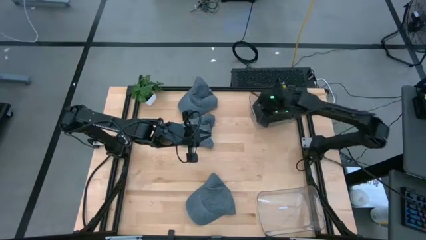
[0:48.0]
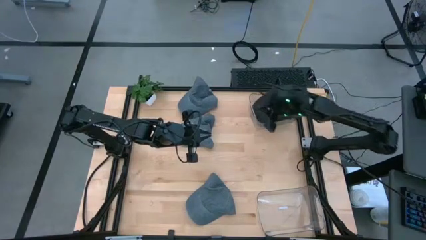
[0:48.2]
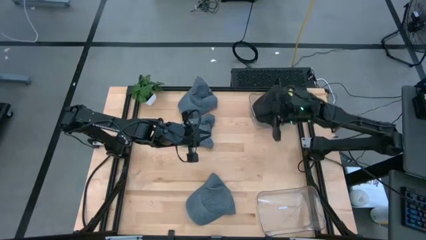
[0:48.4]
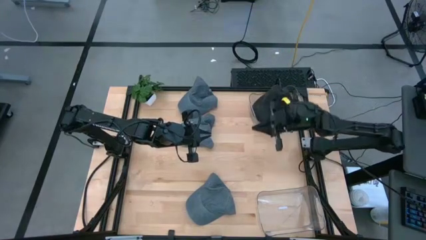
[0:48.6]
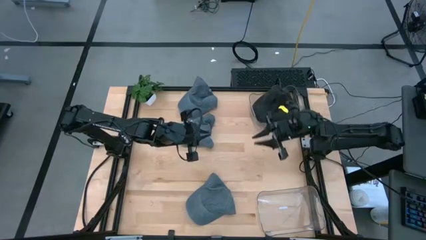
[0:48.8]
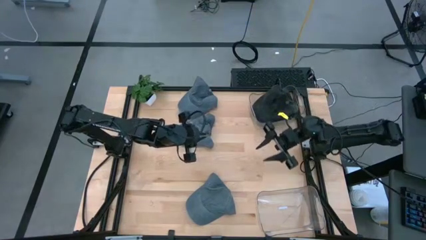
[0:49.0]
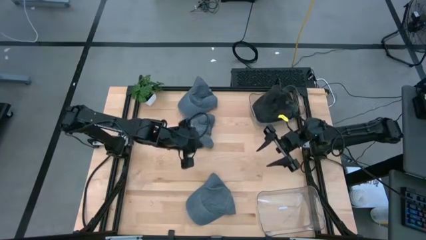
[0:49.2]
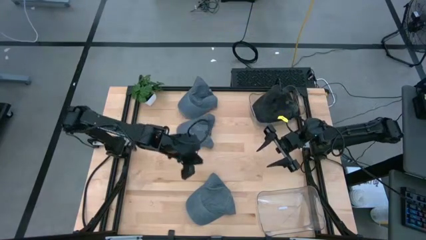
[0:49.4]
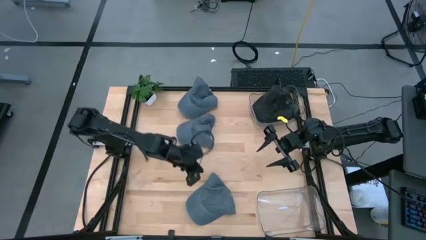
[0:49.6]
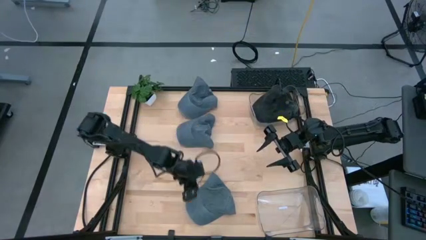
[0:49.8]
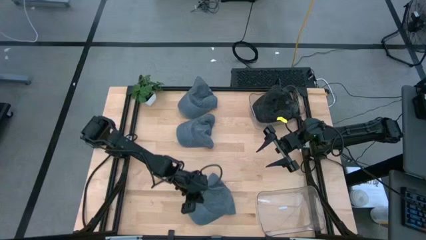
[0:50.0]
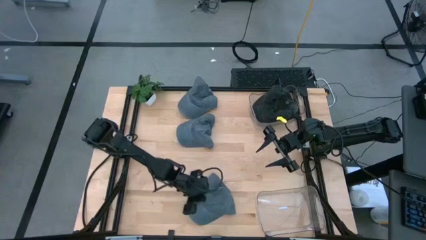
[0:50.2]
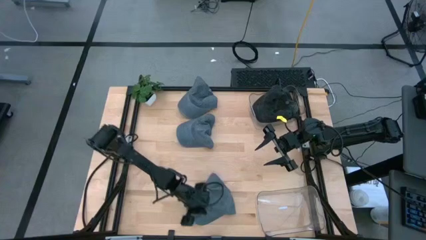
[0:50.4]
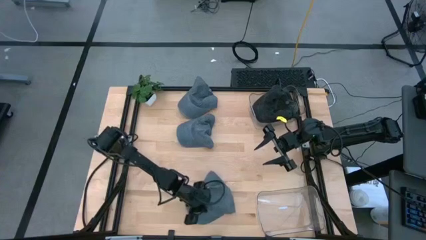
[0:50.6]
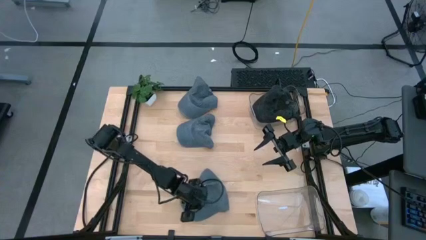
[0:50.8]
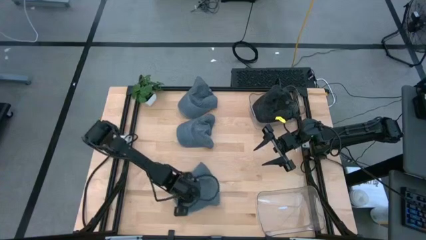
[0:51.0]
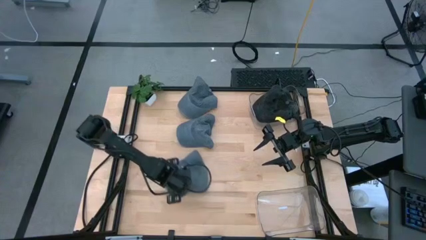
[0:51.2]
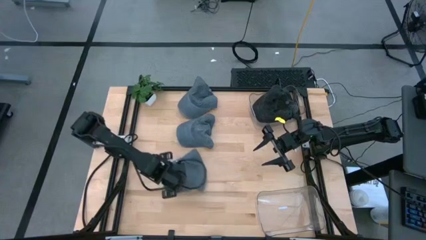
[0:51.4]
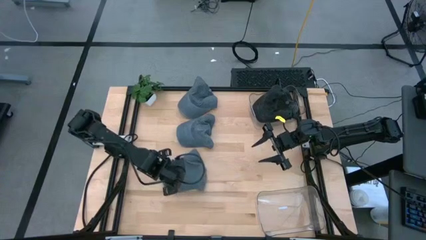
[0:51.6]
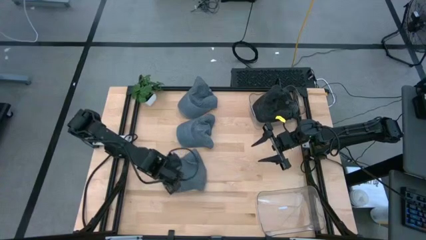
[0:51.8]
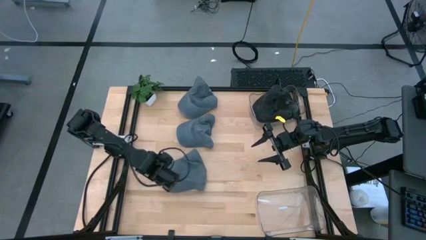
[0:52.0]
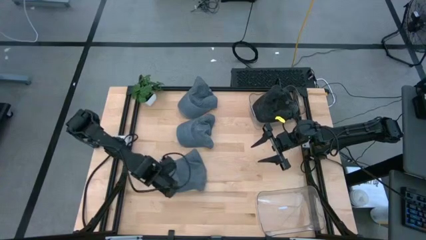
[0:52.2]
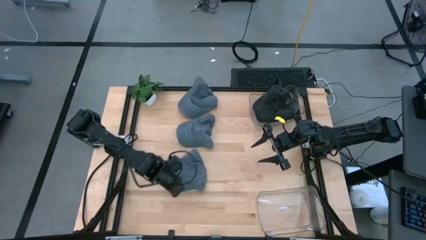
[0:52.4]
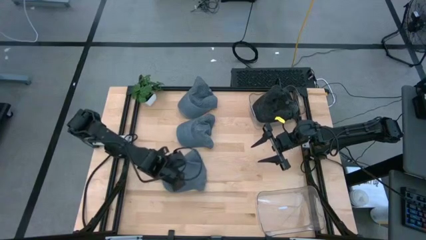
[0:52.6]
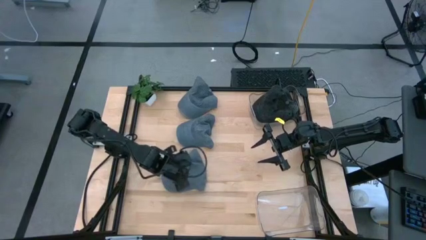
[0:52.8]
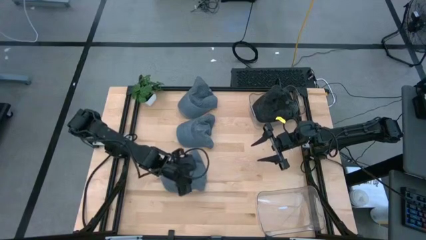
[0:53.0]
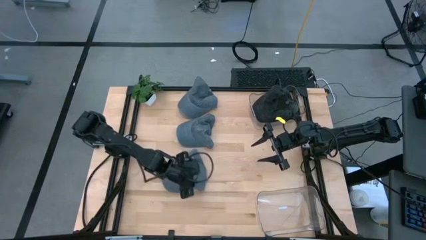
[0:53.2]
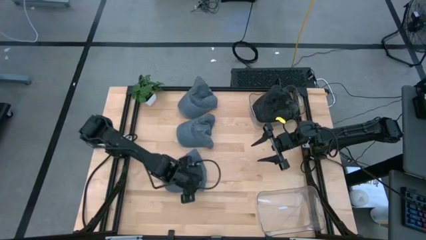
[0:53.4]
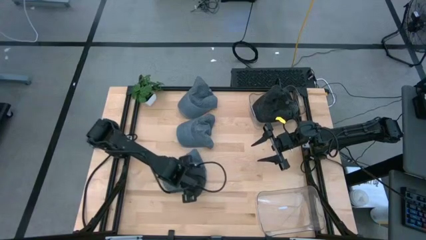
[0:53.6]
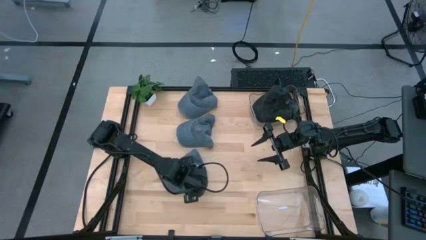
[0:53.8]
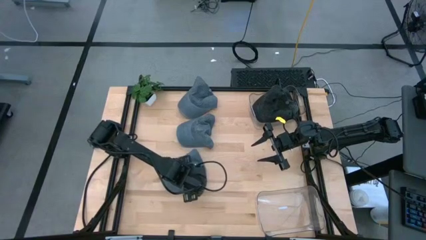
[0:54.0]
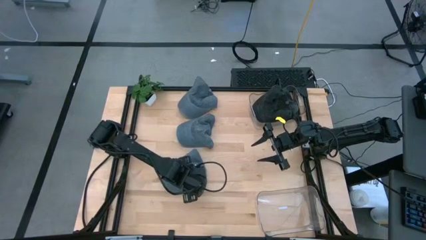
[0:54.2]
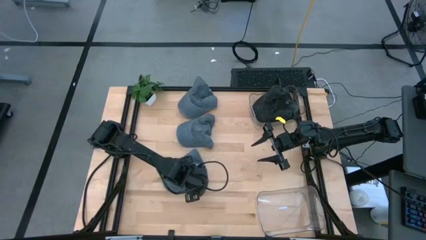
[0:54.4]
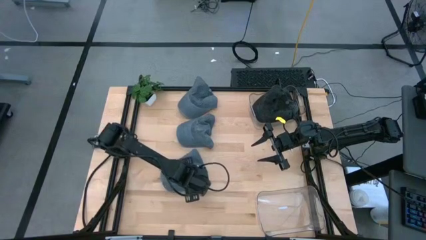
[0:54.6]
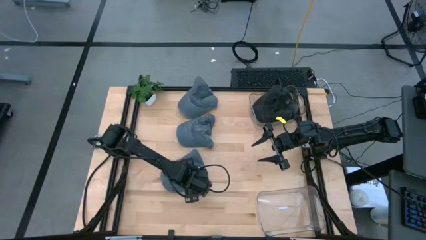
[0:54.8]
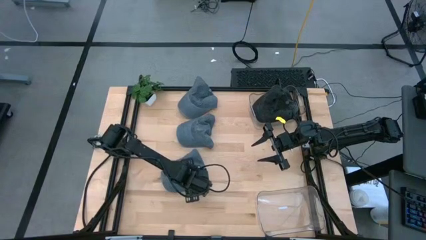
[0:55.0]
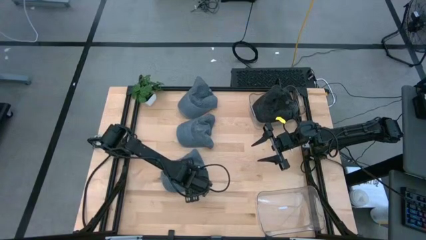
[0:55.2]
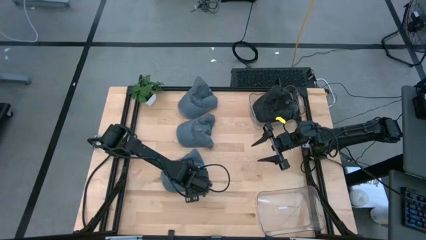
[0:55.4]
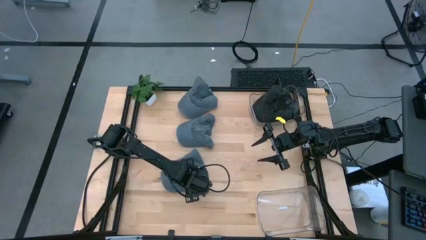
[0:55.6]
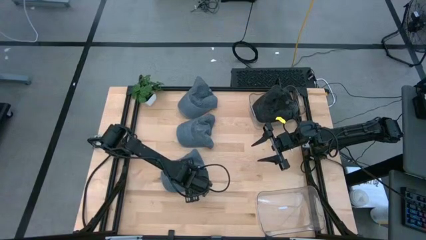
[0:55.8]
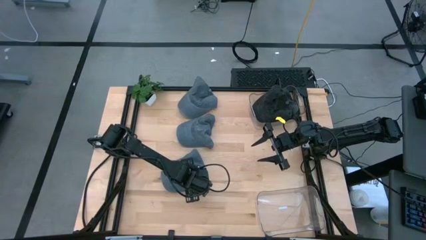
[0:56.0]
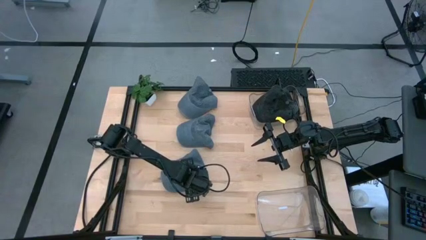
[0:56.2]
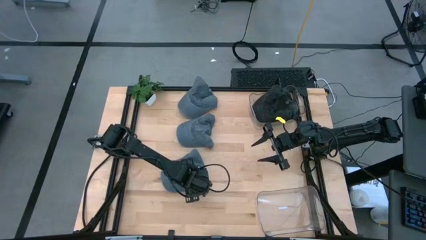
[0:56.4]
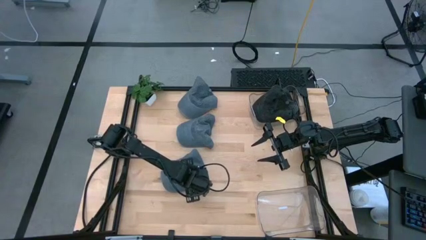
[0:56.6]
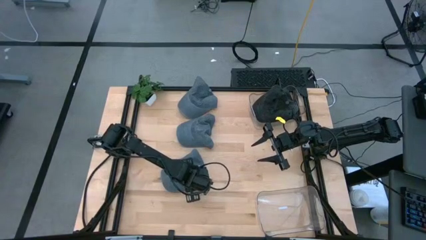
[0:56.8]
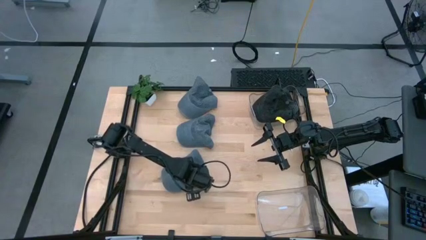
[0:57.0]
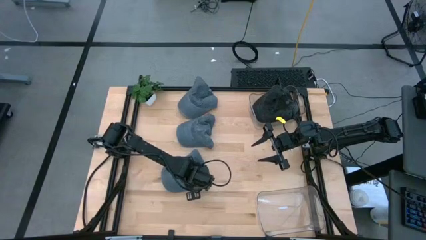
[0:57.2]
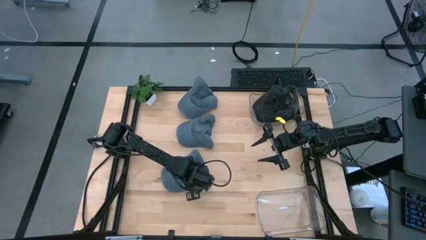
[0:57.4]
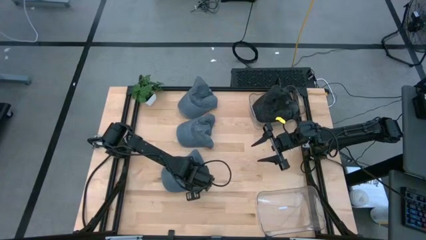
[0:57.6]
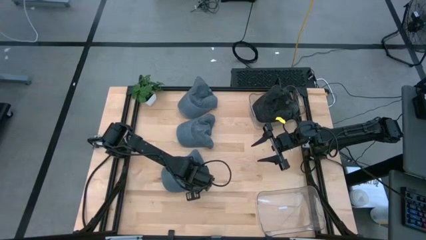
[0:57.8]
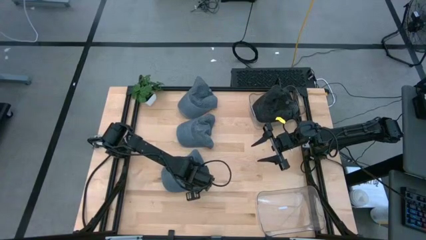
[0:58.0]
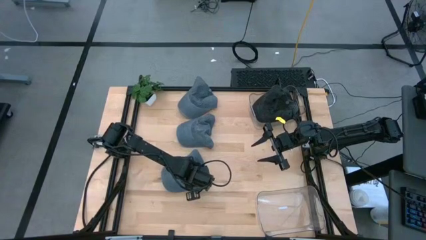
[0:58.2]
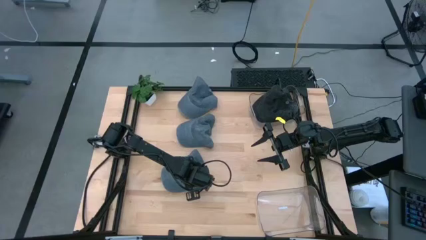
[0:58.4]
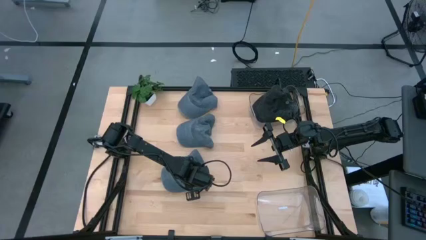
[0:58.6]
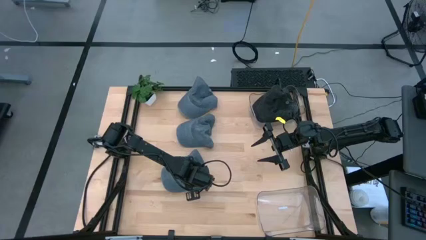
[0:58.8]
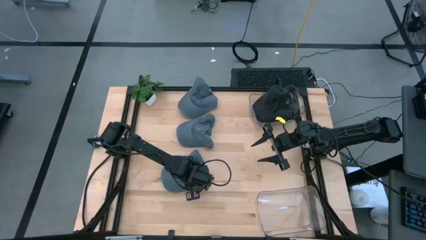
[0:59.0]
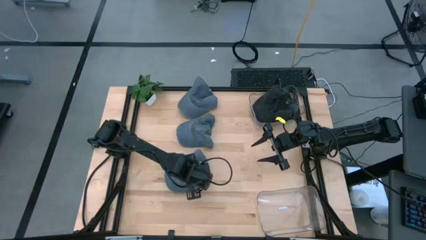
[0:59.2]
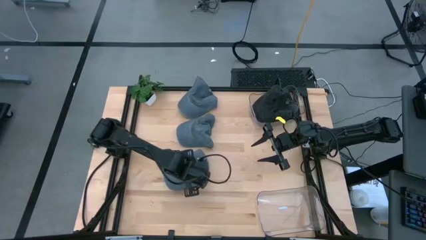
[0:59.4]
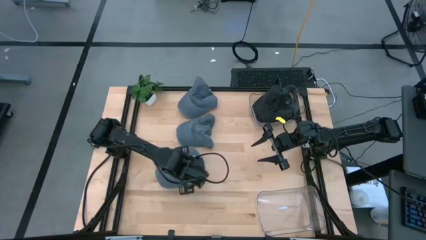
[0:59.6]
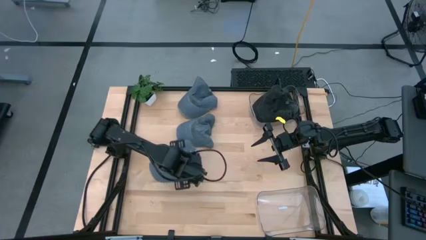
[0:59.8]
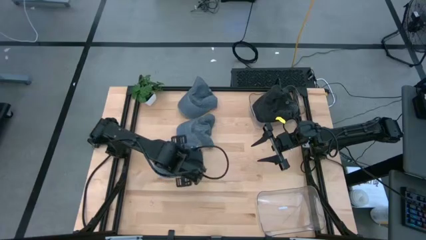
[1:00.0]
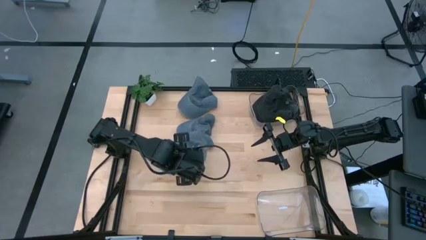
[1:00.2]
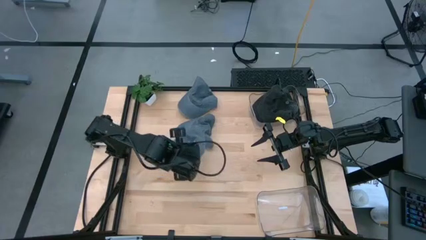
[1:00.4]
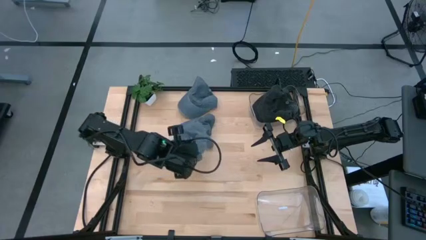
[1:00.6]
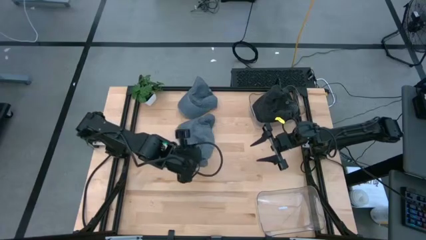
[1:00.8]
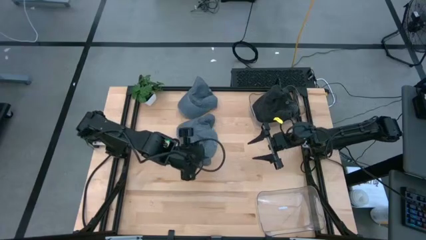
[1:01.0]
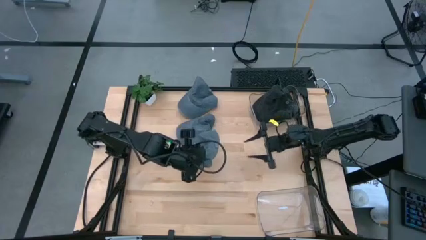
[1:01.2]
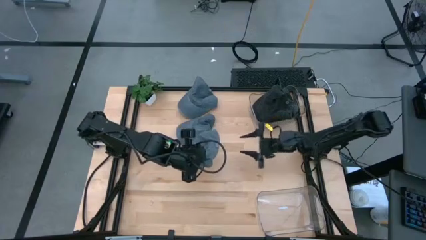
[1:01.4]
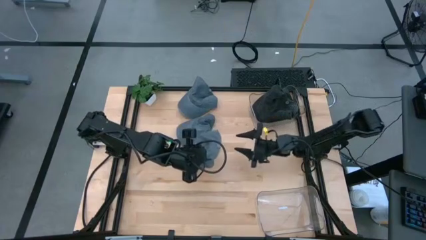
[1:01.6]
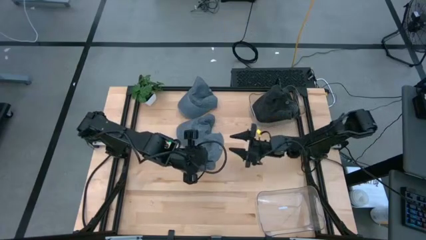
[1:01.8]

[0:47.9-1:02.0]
Task: Pick & Place hat
Put the bottom gray cap into the bottom transparent bin
